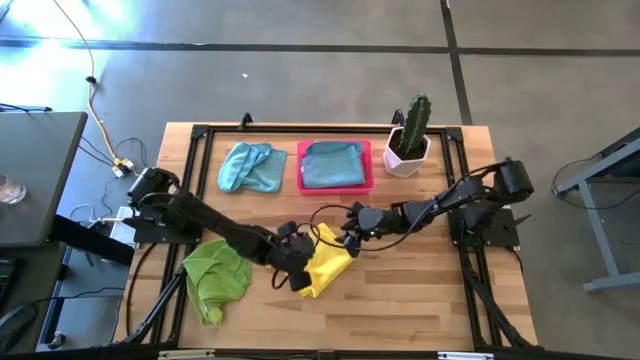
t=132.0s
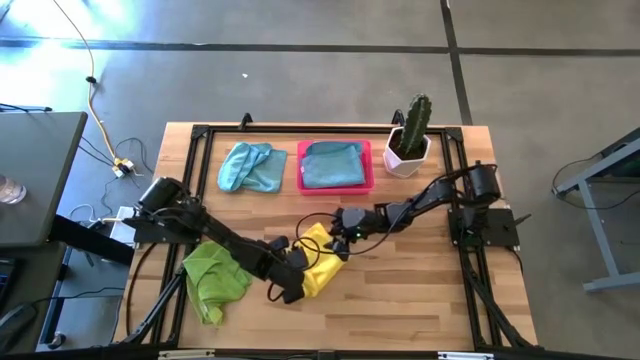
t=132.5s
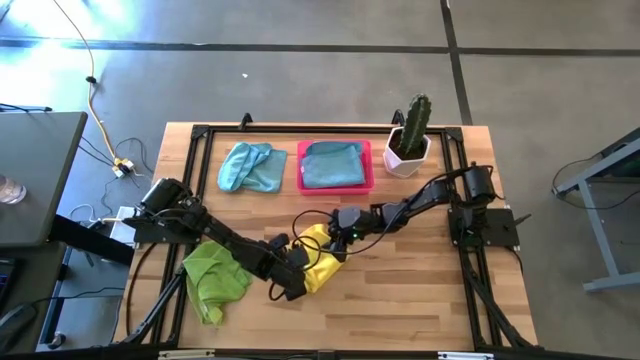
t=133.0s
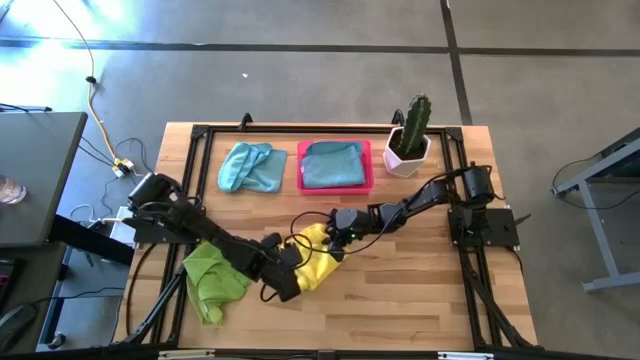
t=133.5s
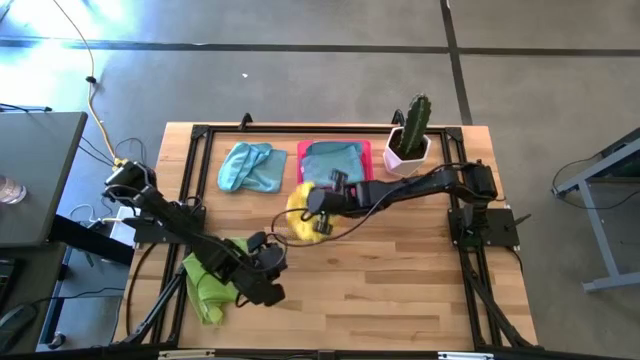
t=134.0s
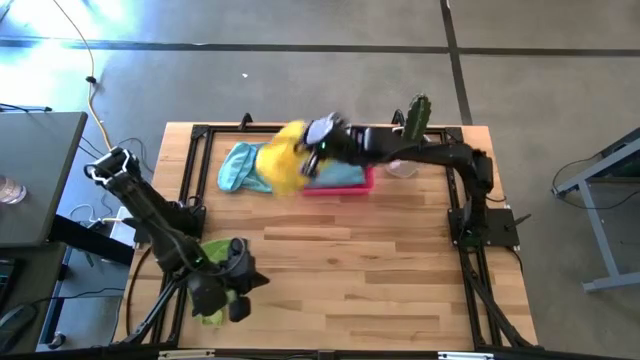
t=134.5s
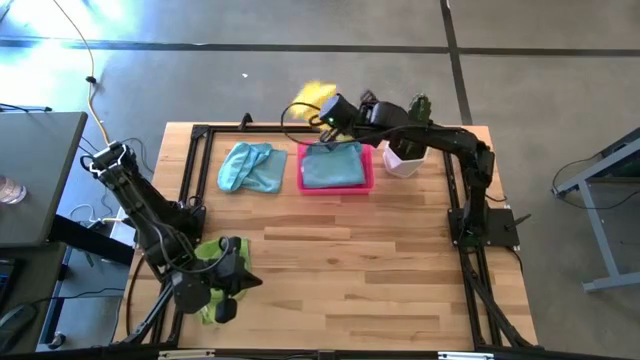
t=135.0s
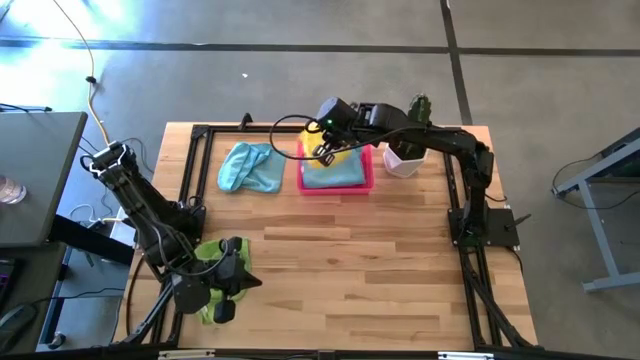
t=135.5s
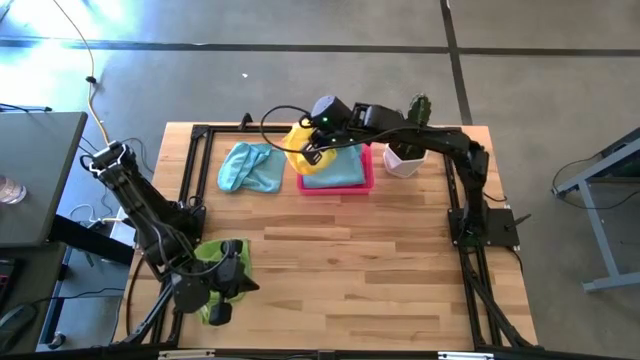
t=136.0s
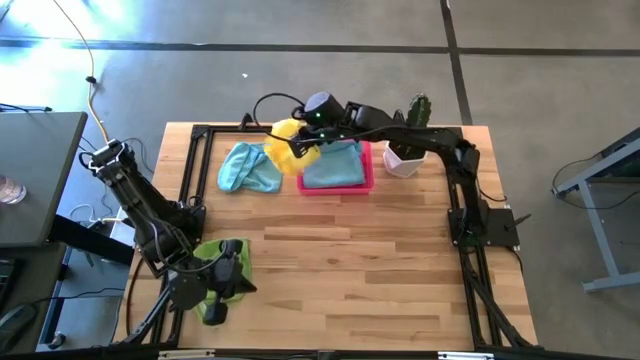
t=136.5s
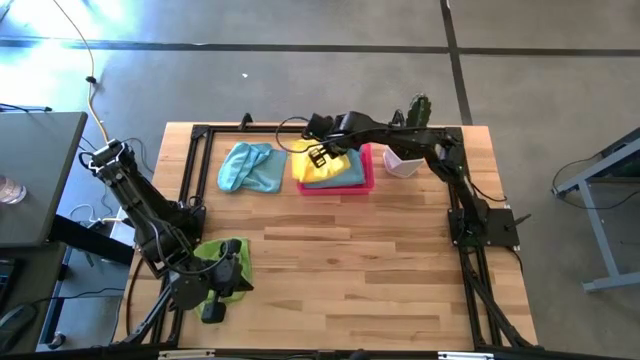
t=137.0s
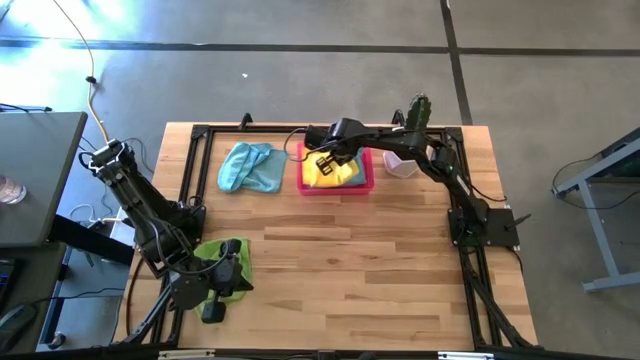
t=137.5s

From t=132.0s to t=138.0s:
Task: Fold microfiber towels
Stack the folded yellow microfiber cloth on top of the blue microfiber cloth in the pink bin

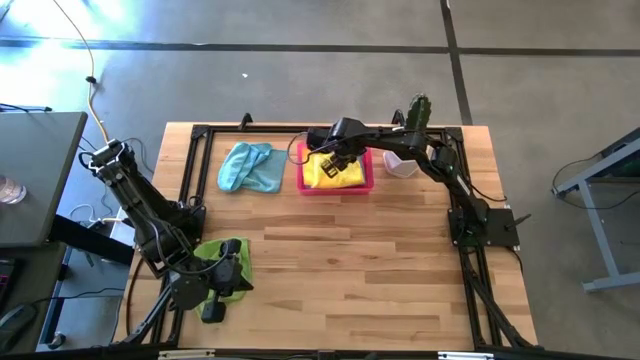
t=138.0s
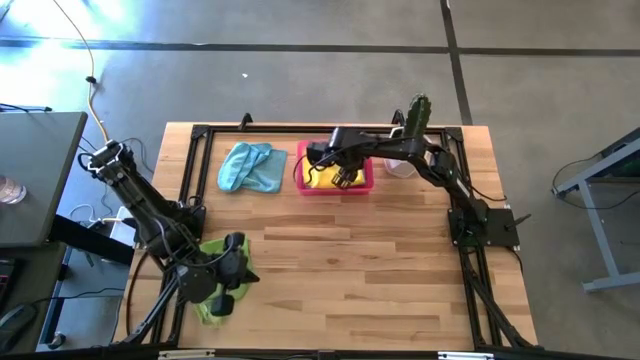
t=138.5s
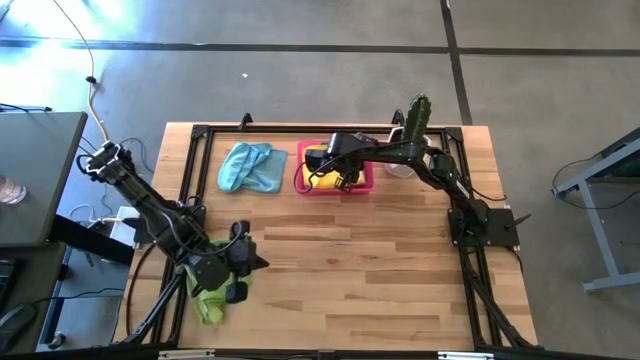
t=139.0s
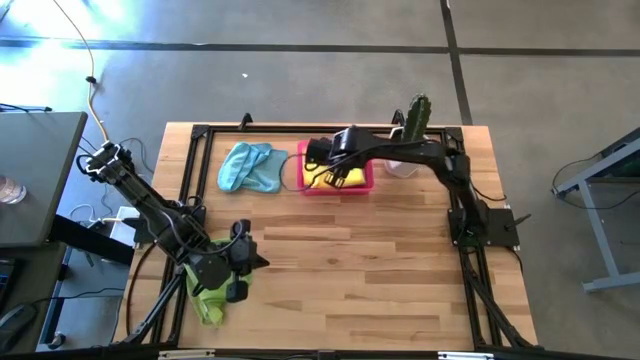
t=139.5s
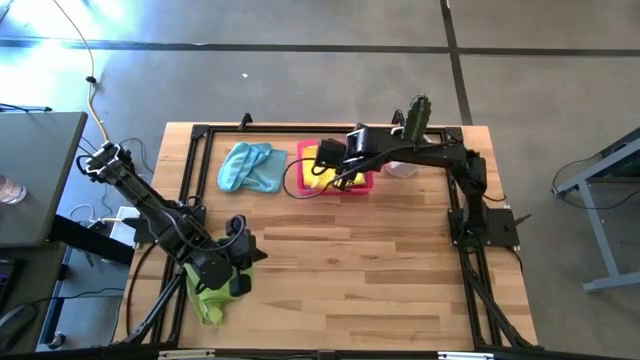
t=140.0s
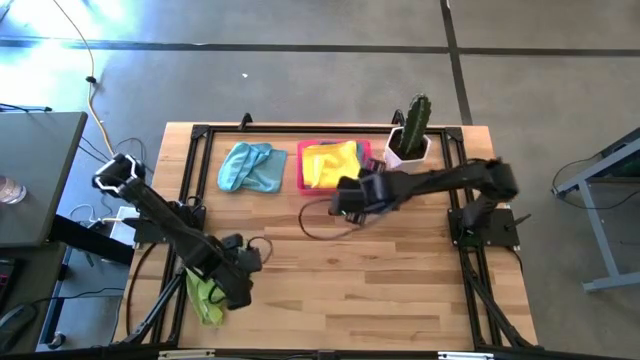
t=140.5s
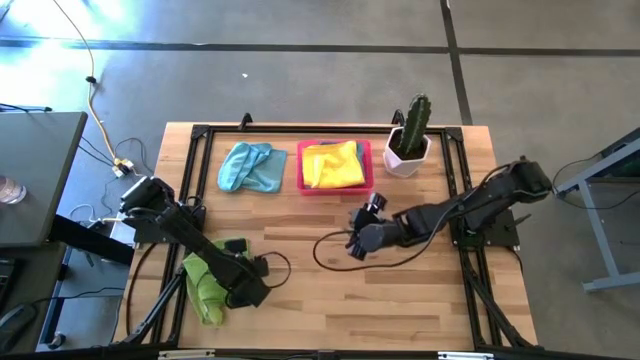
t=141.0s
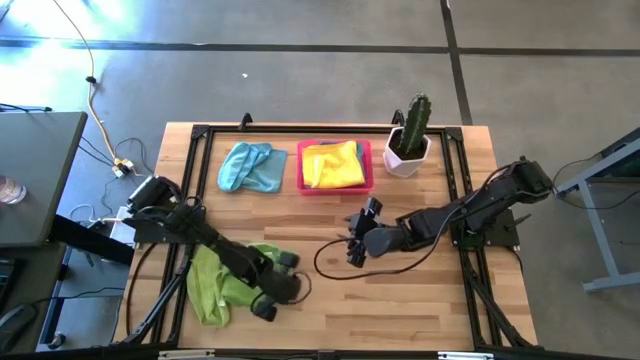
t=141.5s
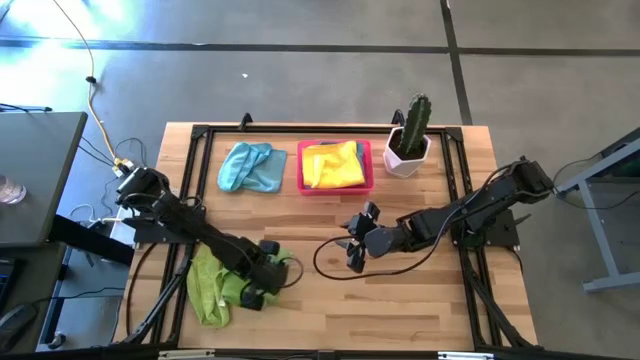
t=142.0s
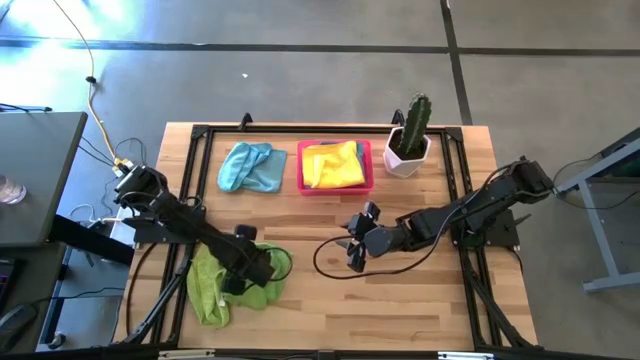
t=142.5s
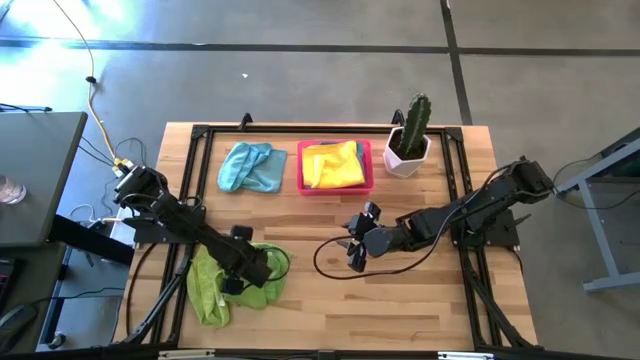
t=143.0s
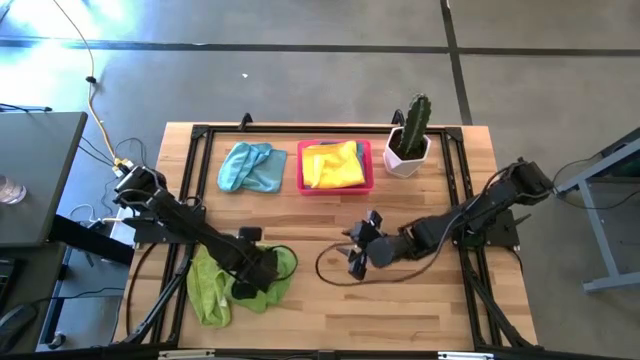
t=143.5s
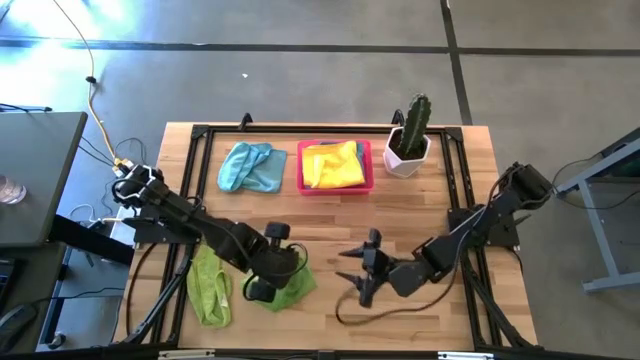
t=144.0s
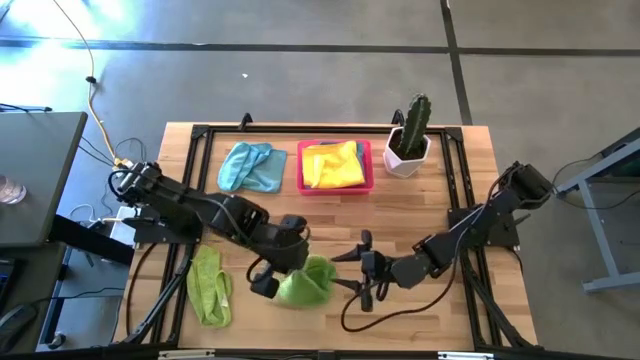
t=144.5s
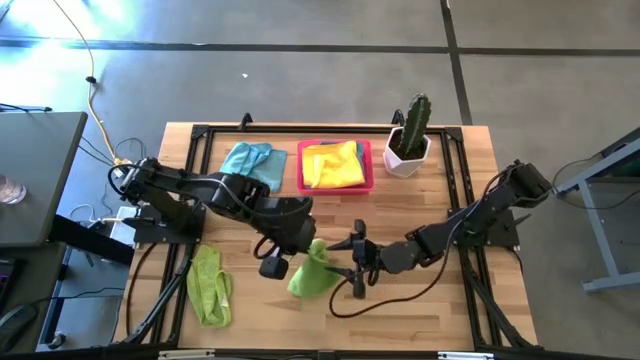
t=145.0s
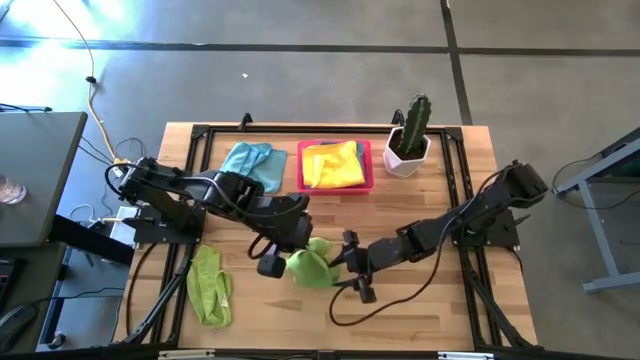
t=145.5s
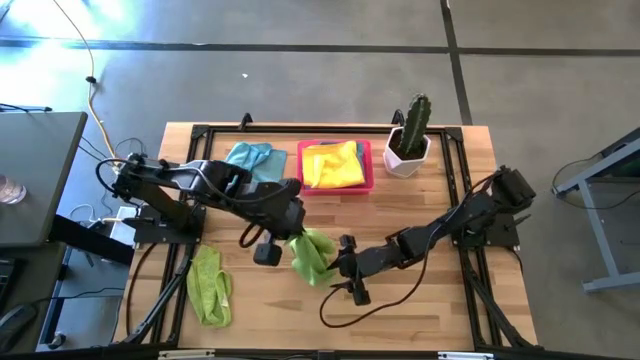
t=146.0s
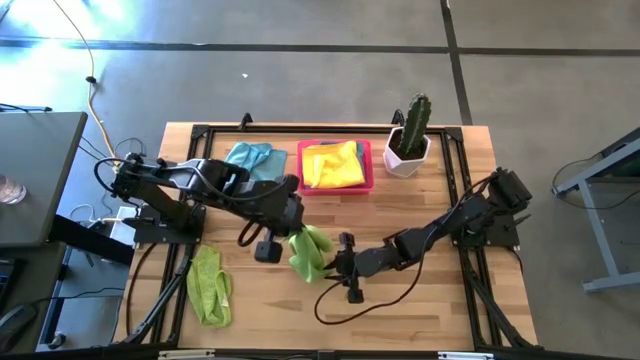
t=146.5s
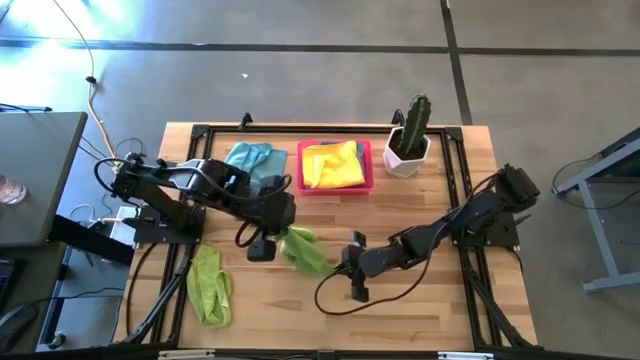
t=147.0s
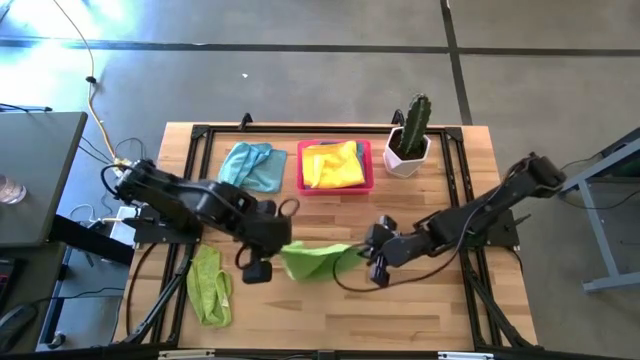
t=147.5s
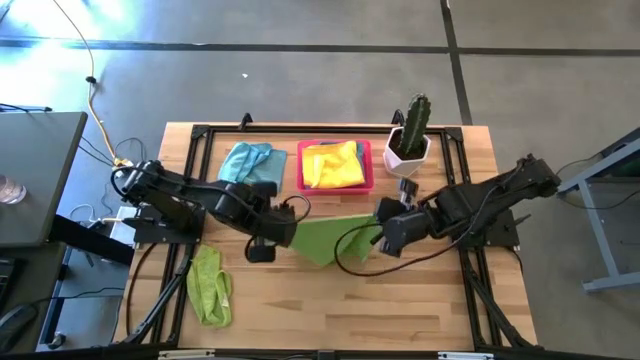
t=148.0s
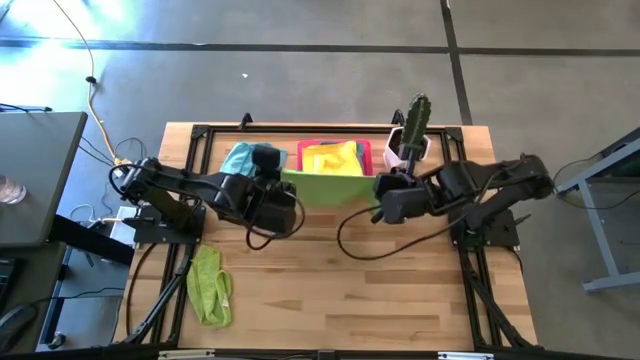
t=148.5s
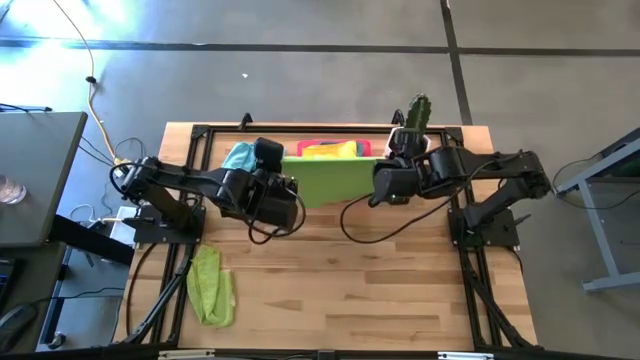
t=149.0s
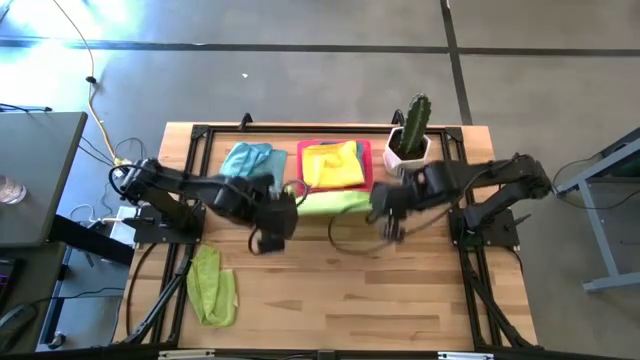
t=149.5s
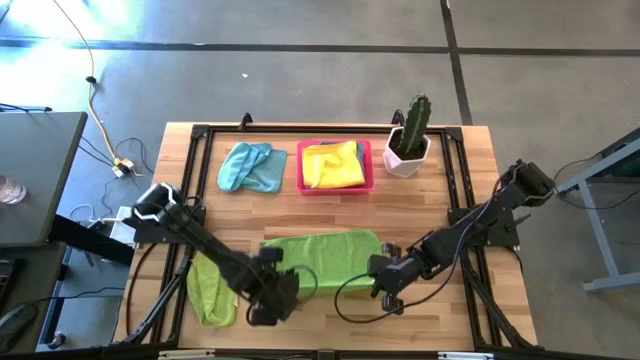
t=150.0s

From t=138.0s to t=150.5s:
Fold the green microfiber cloth

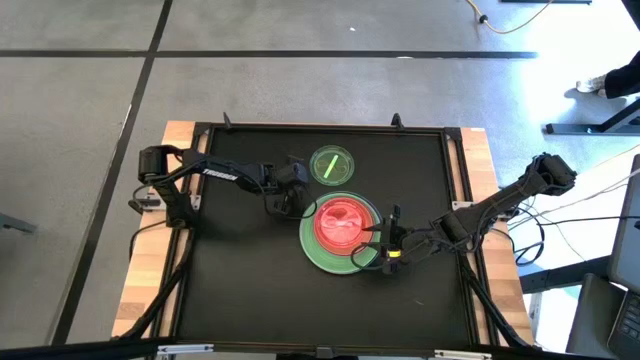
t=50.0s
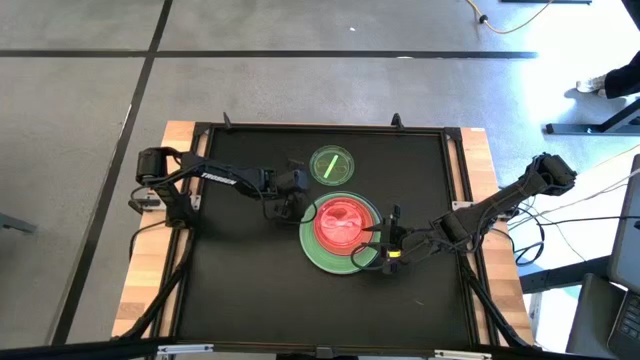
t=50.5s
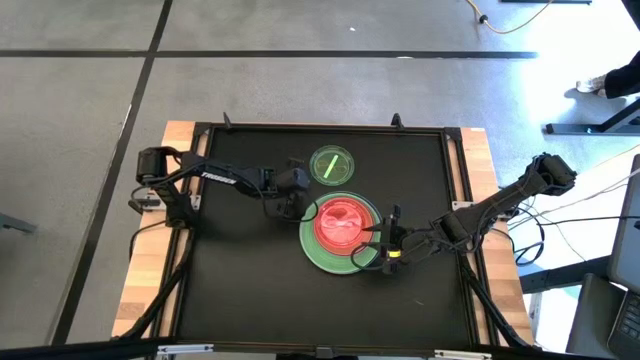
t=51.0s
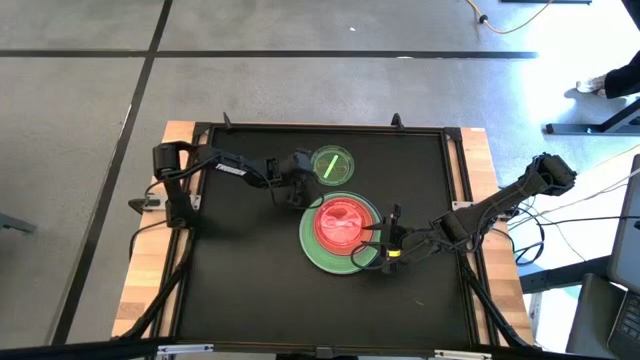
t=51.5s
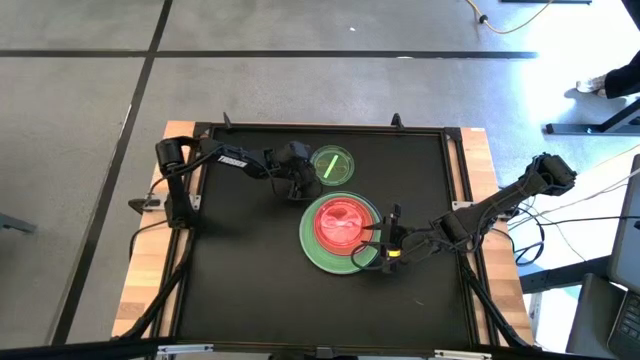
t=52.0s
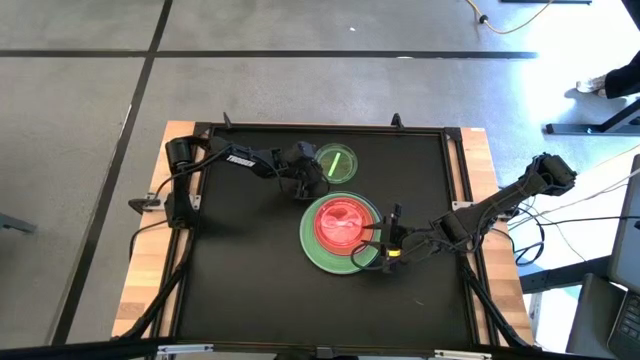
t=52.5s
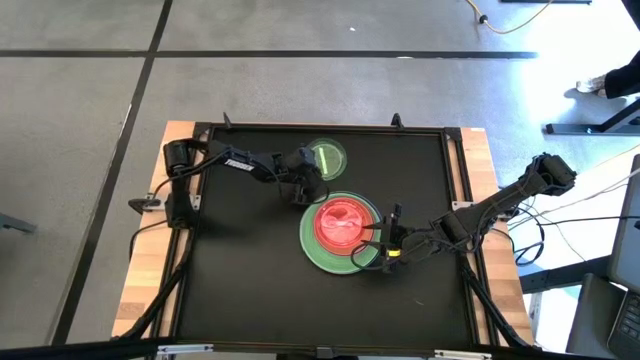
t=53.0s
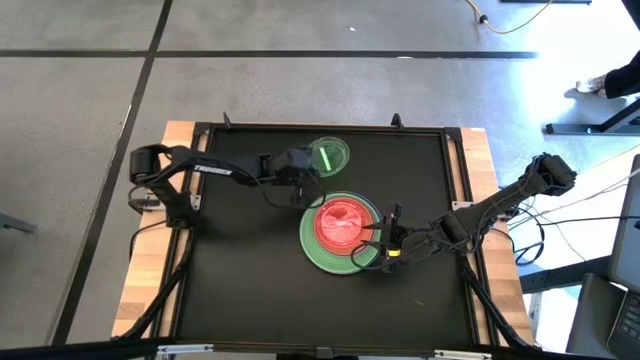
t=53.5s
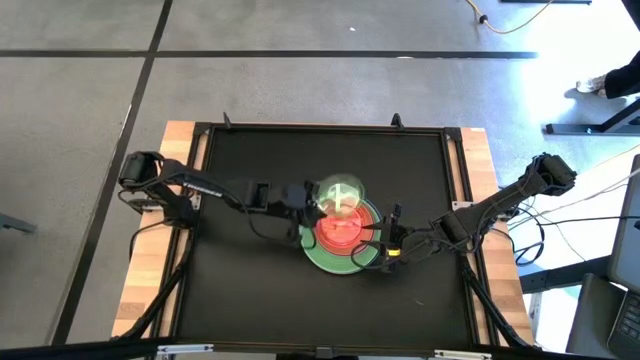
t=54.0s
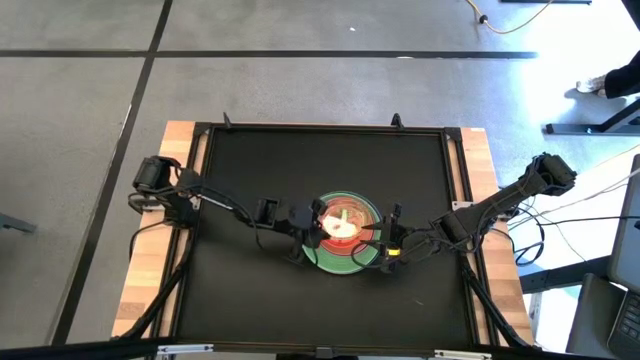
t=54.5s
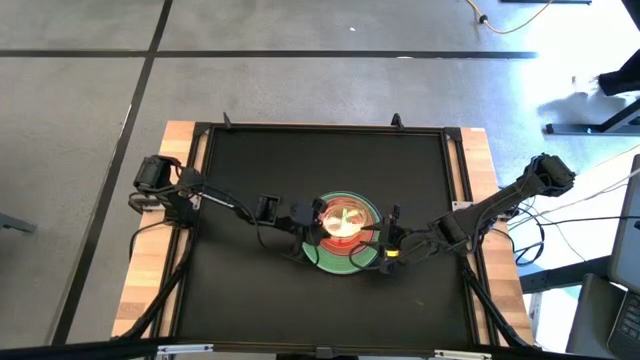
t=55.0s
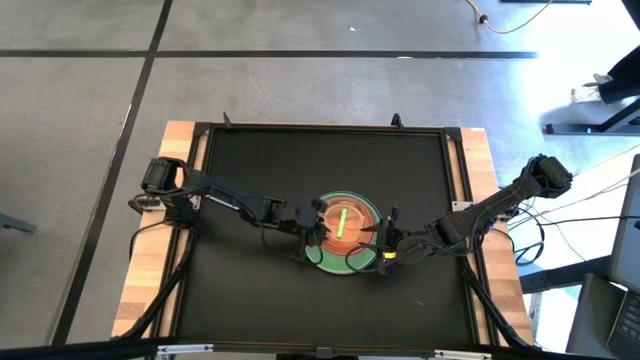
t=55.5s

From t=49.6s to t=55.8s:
Task: Stack plastic plates
Stack the transparent green plate on the transparent pink plate
